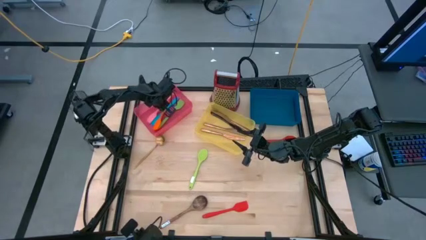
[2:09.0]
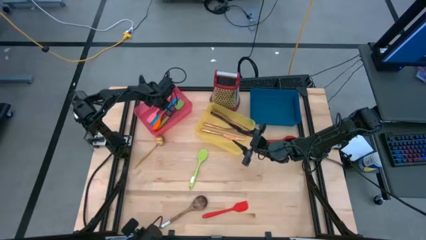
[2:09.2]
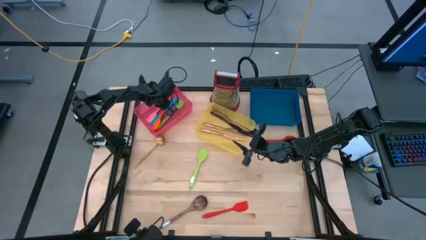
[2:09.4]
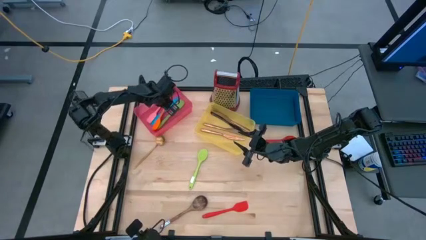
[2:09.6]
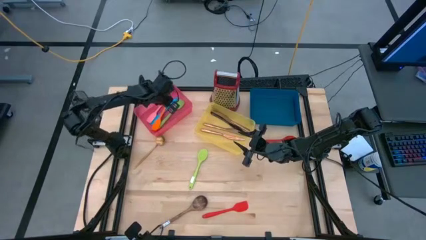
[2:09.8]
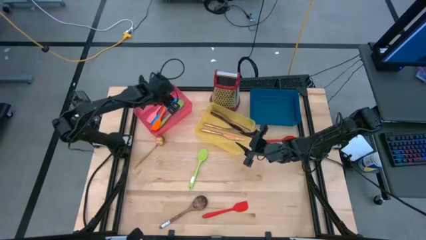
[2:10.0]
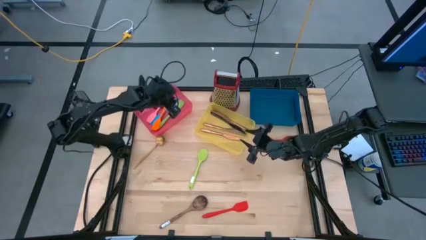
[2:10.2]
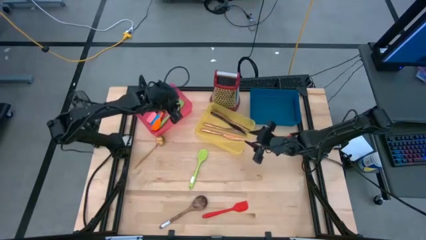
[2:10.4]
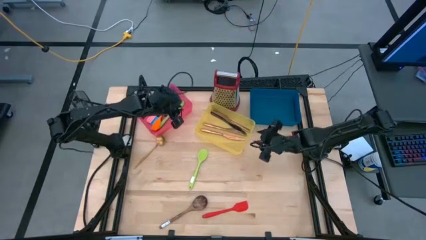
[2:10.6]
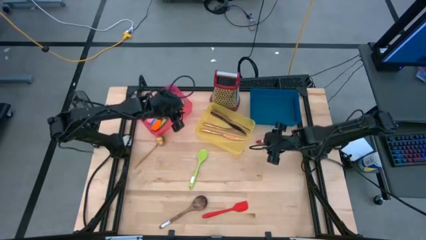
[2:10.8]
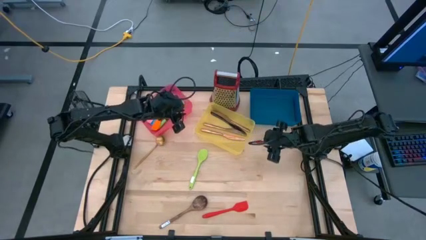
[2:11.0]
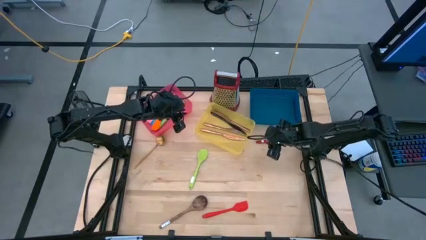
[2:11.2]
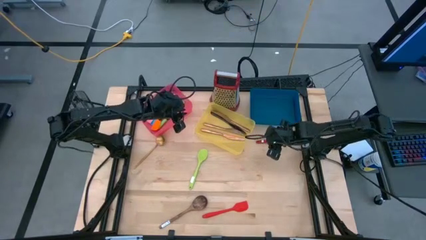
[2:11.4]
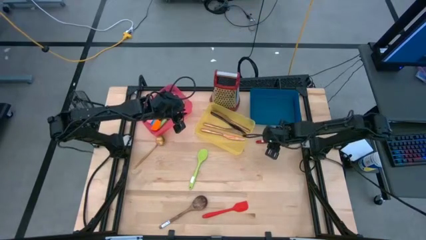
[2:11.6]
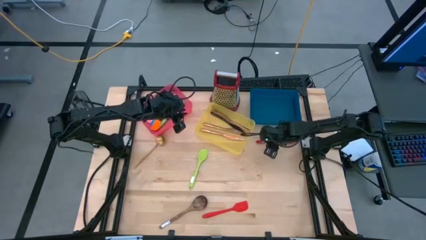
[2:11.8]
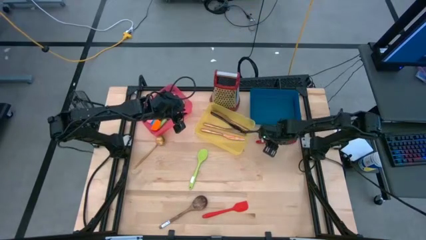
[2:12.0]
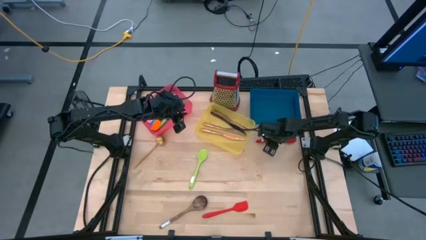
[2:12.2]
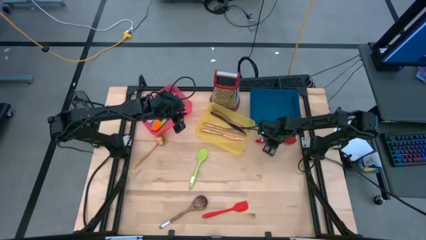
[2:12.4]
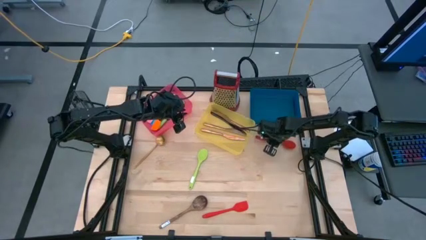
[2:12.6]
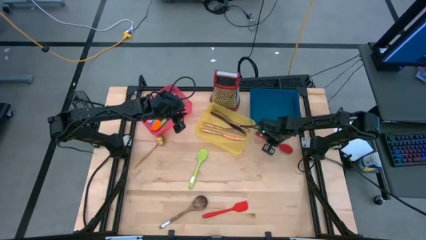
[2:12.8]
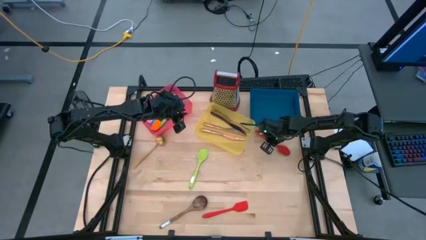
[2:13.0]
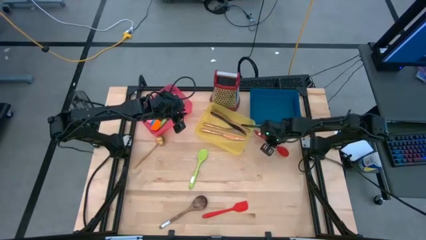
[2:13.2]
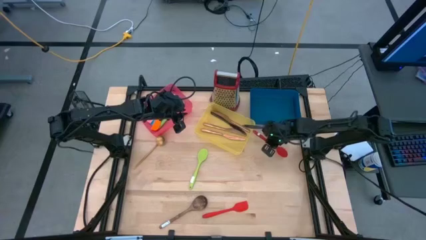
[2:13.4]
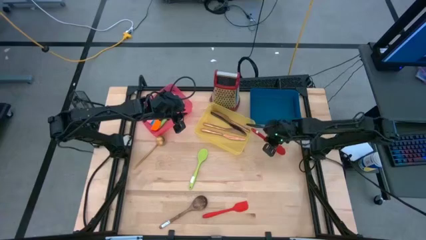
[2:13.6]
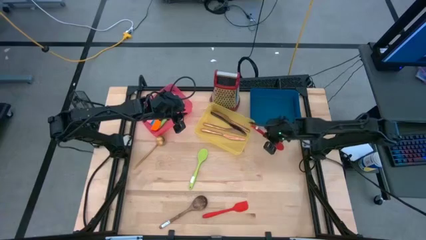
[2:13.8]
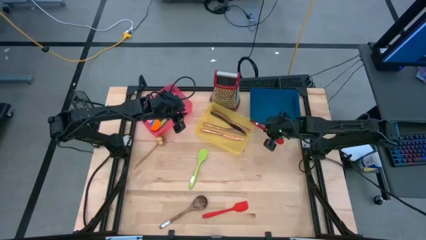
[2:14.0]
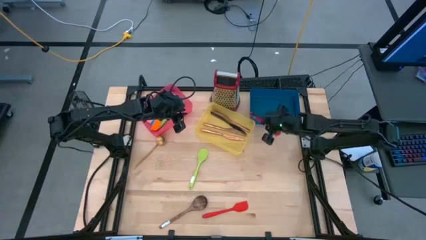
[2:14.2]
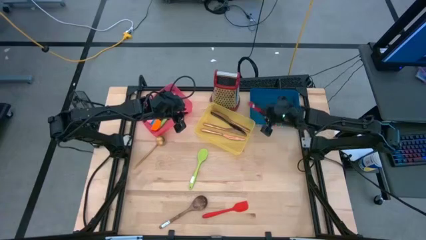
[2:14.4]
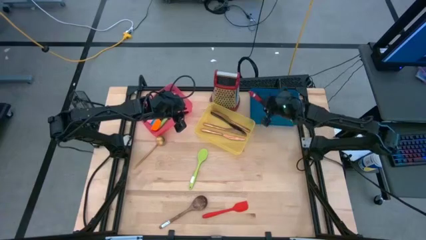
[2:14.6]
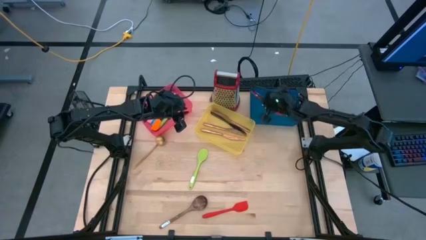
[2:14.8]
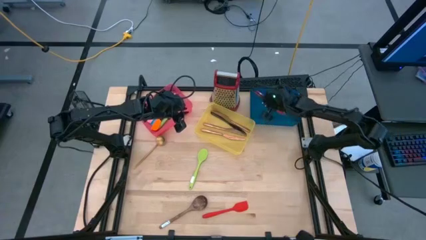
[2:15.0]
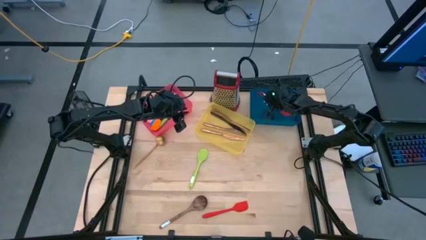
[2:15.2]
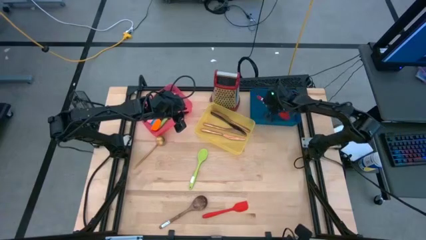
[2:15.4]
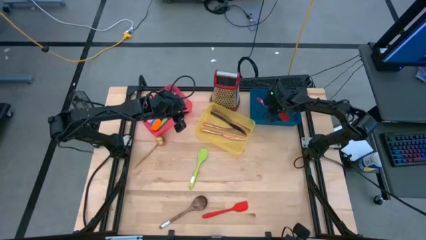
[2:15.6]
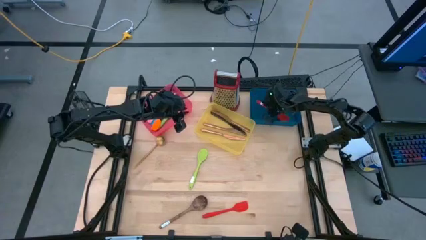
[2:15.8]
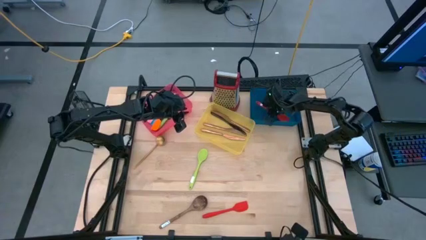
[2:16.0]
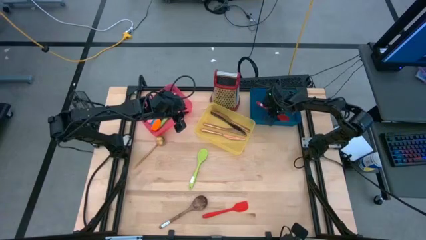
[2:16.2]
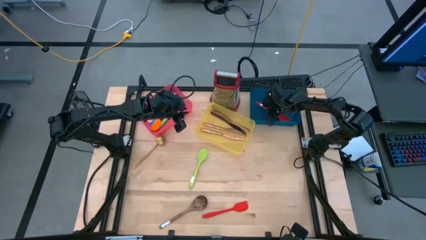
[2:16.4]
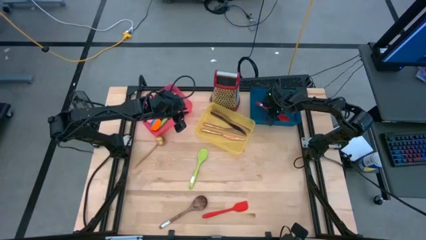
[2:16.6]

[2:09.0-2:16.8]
Task: Pick & Place Kitchen Items
Put the red serving spoon into the blue bin

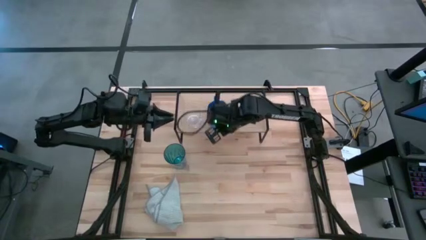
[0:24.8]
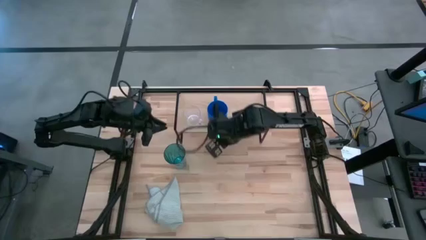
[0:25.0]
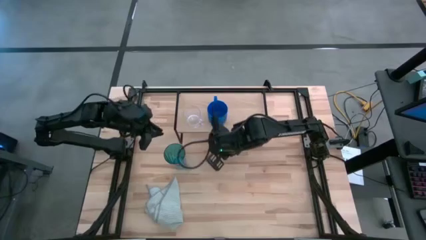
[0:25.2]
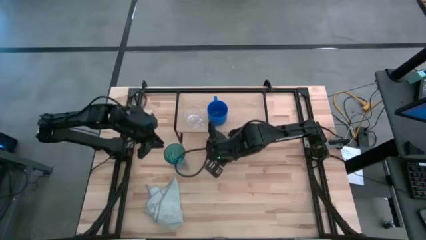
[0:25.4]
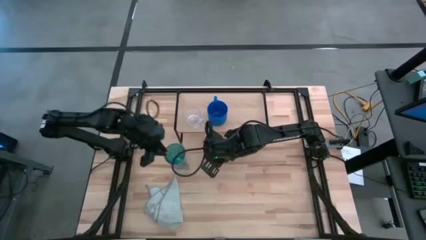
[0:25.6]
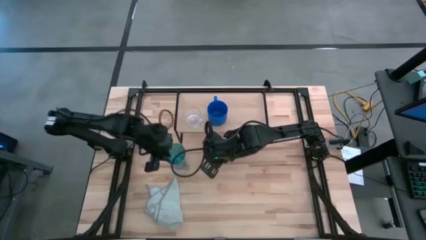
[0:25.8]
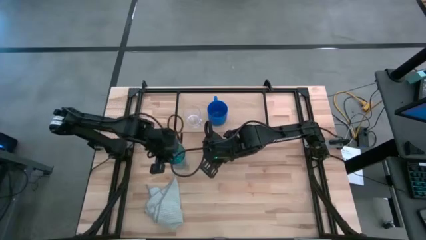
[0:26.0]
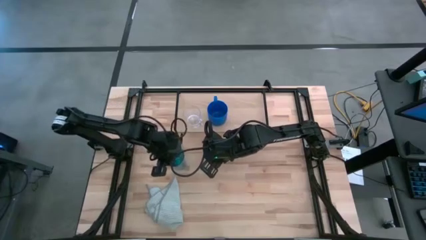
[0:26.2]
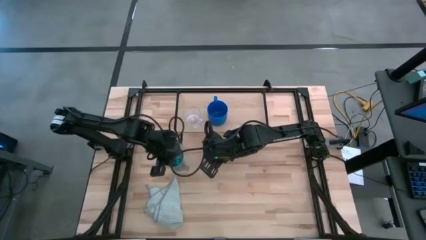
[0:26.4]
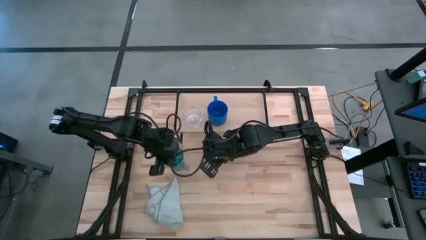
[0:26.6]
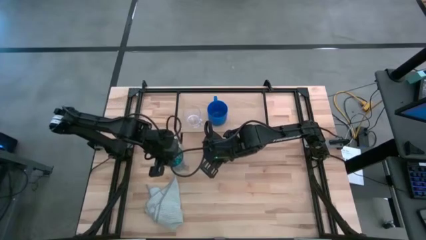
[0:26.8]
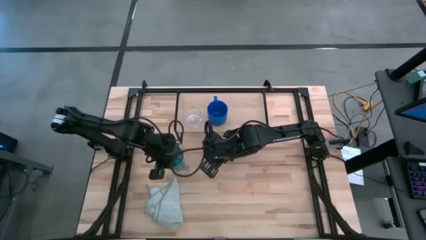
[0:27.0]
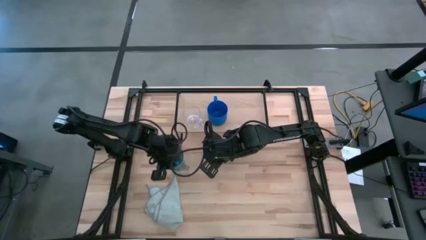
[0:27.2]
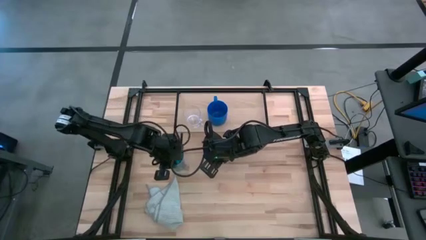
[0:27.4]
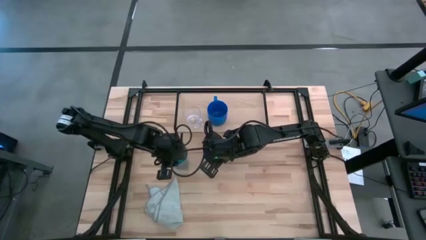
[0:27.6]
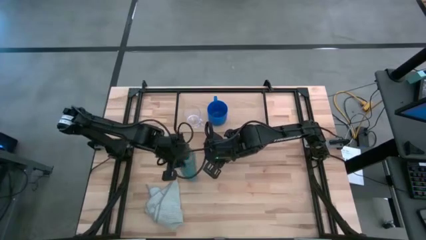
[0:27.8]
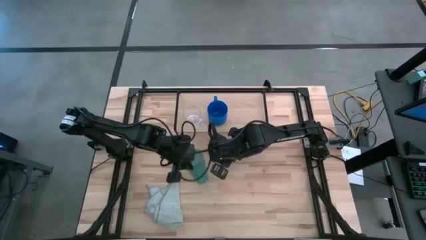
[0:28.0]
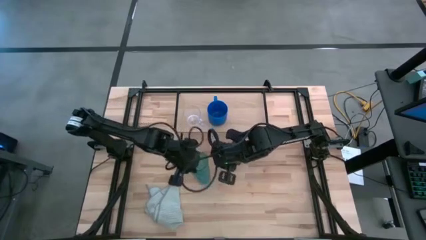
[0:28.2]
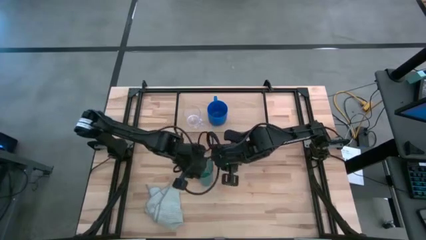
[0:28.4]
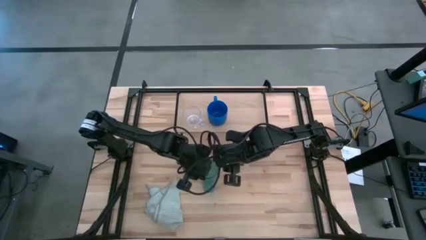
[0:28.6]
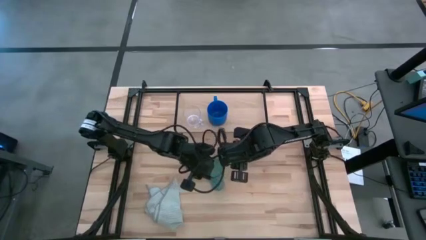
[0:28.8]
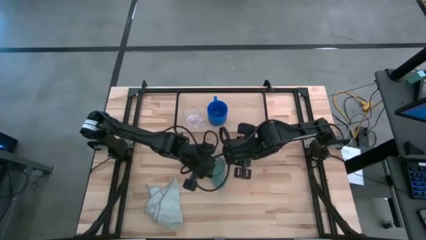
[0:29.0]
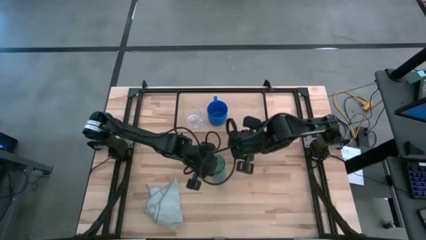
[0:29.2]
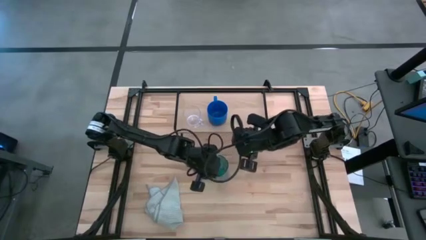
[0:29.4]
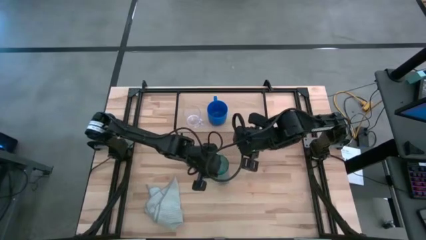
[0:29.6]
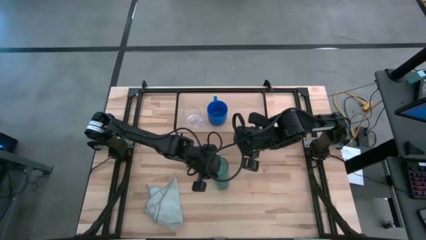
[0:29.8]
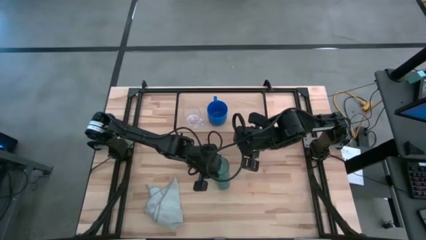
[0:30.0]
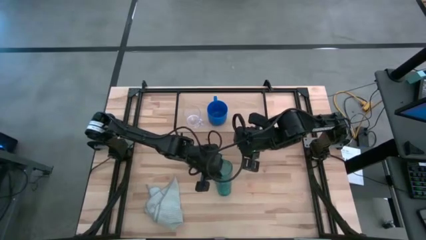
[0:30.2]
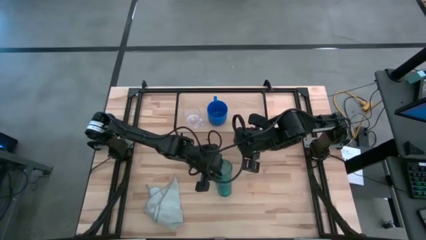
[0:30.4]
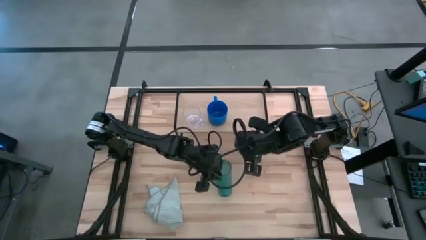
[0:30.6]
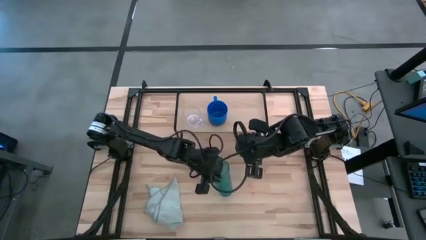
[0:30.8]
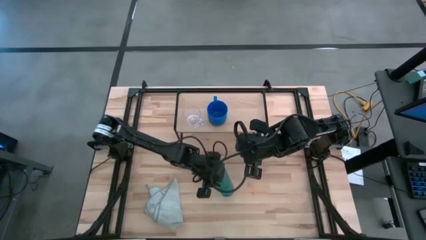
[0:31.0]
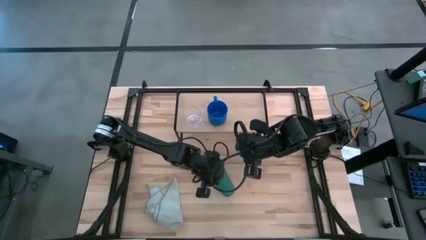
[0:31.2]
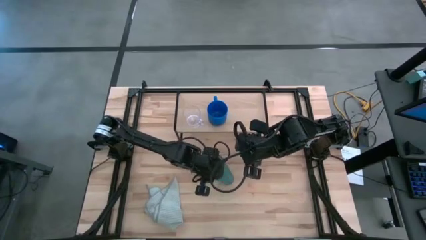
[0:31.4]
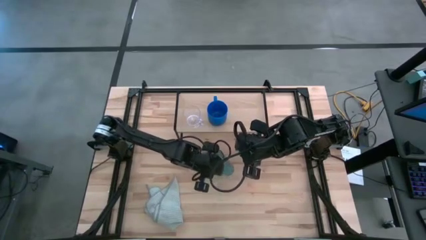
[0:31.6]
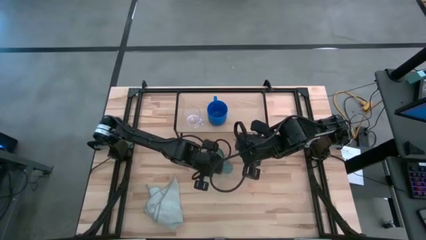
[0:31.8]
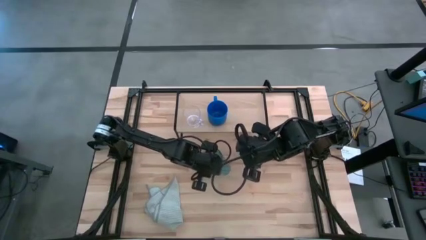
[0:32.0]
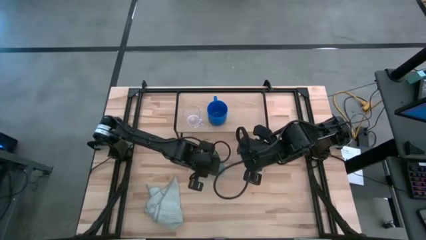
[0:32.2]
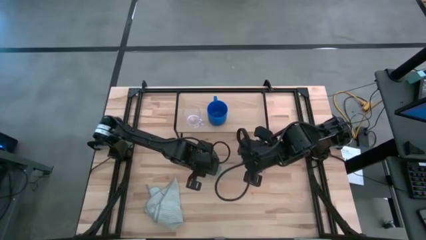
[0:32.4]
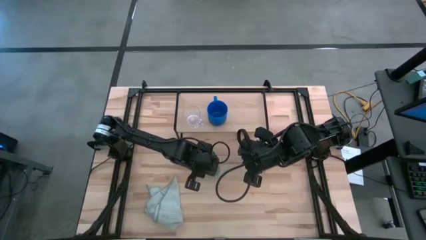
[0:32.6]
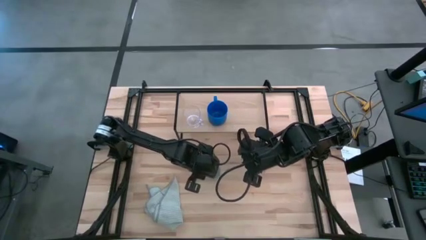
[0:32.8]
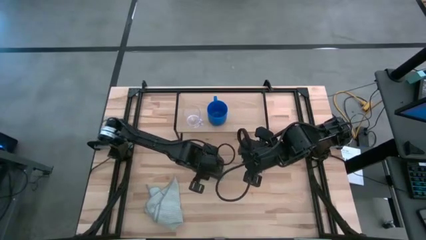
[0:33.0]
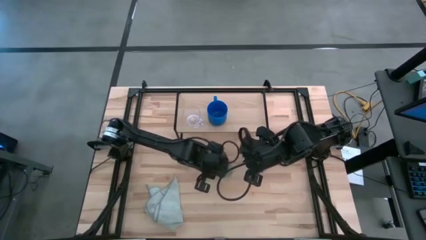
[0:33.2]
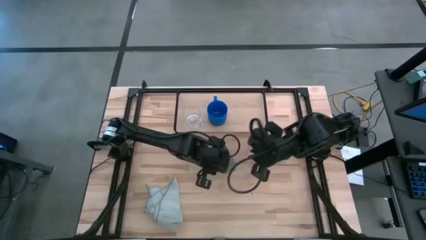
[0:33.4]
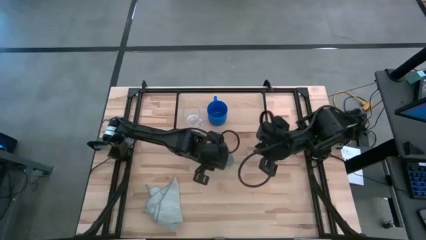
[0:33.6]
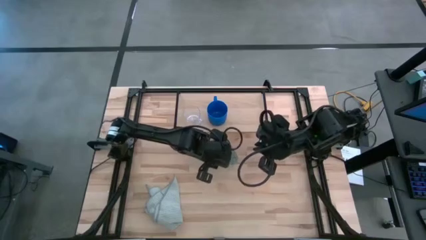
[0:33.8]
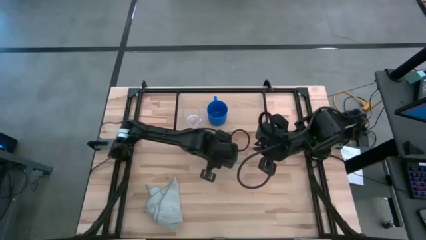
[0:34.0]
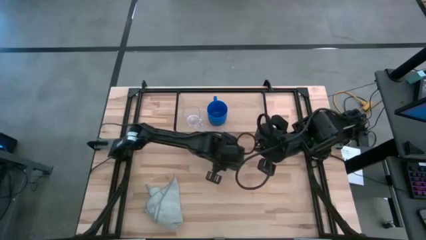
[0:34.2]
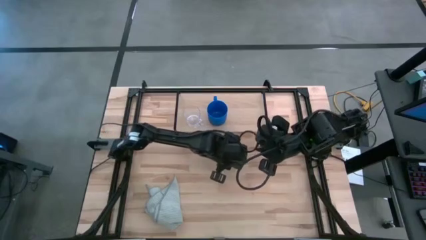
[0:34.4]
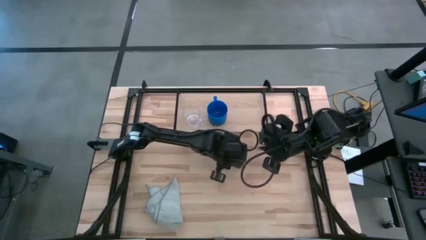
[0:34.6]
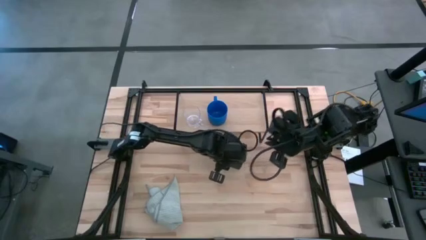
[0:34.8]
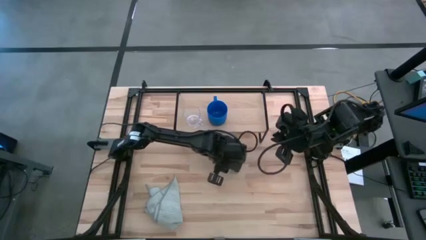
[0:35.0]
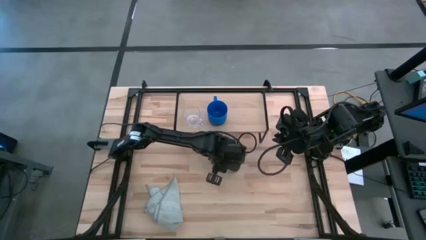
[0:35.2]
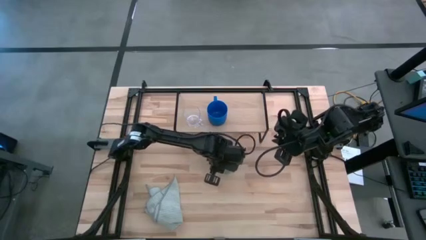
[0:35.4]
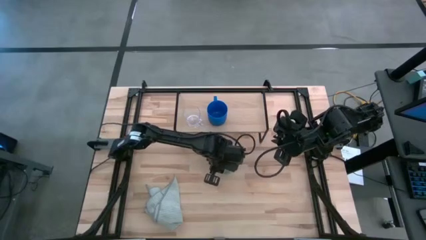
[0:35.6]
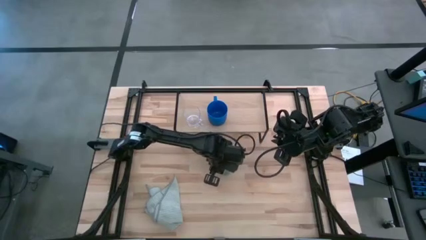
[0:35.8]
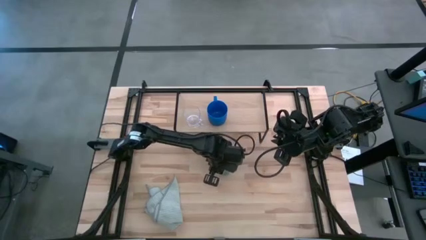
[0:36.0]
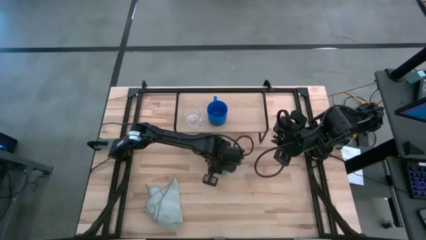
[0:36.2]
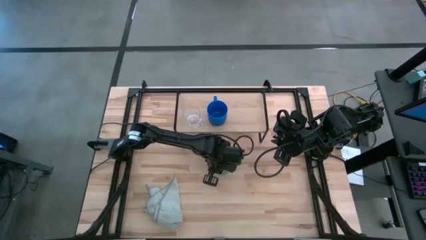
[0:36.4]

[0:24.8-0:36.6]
Task: Stack small to large cups/mugs on shelf
Put the blue cup on the shelf
